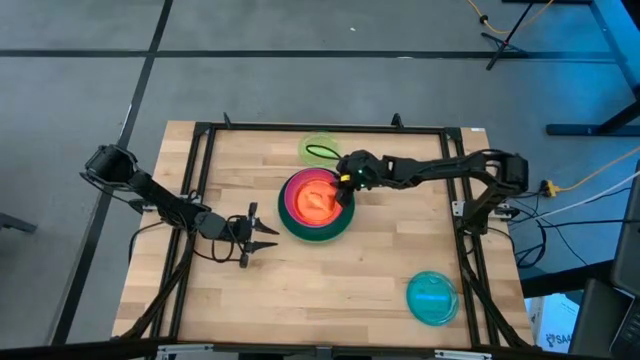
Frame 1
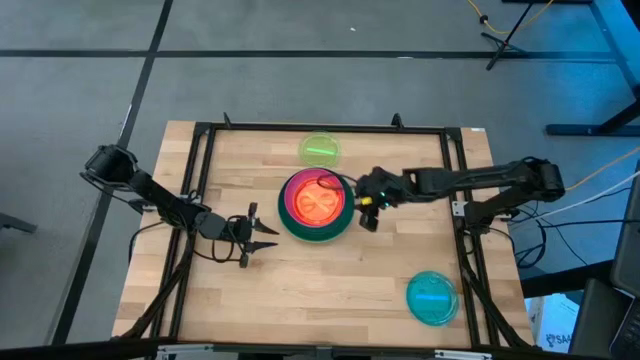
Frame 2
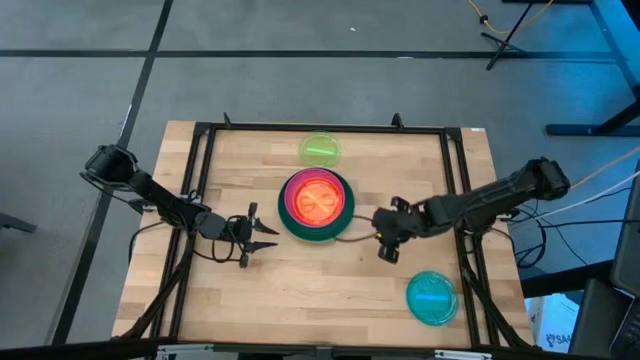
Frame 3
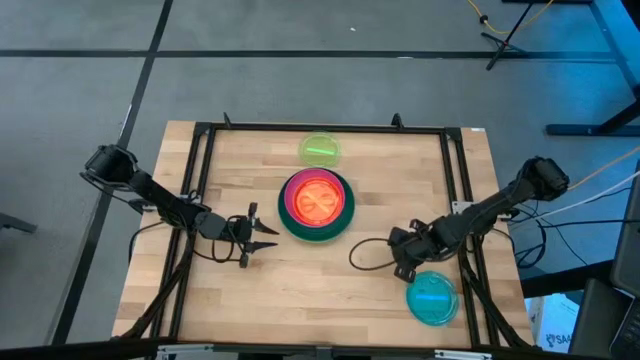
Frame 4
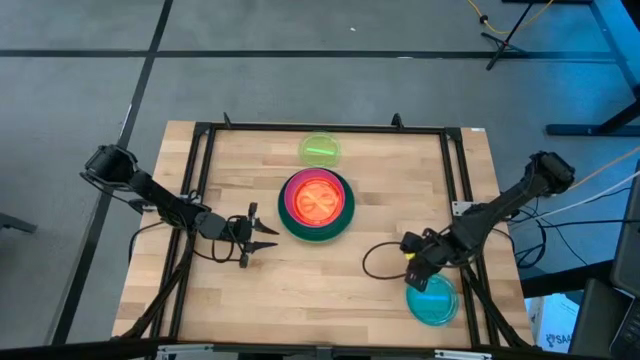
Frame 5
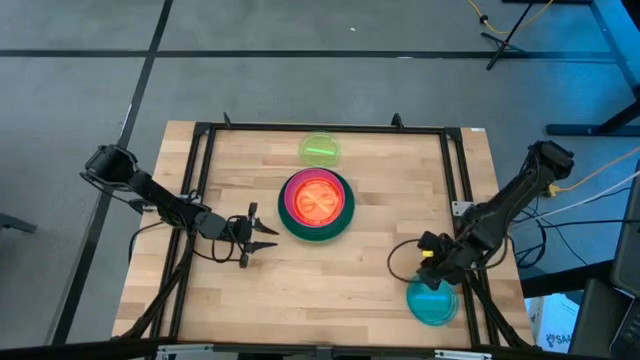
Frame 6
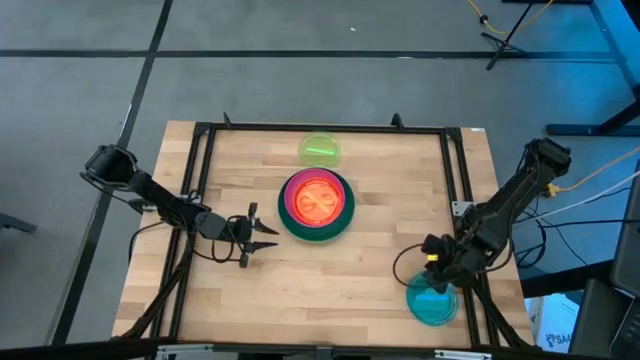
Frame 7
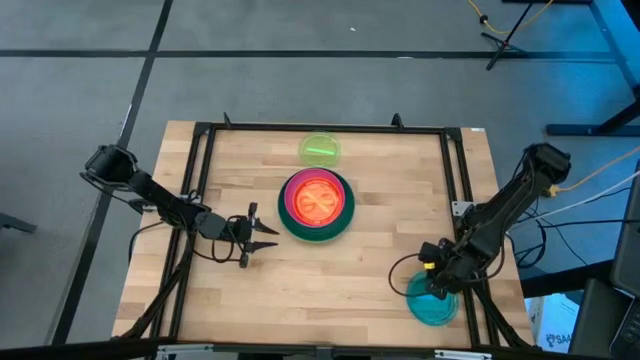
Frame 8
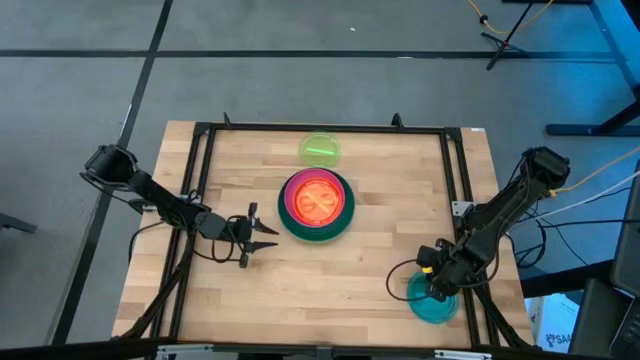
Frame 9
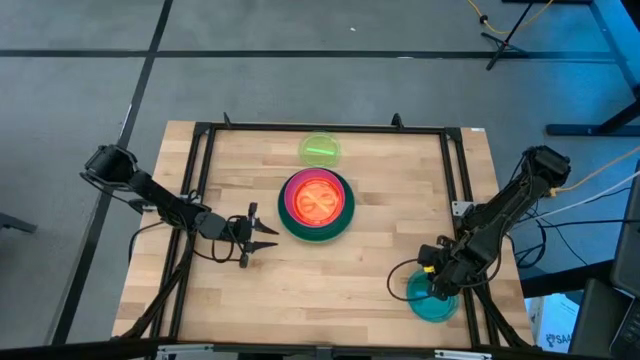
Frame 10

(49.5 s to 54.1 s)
Task: Stack plastic plates
Stack the light blue plate on the orange plate

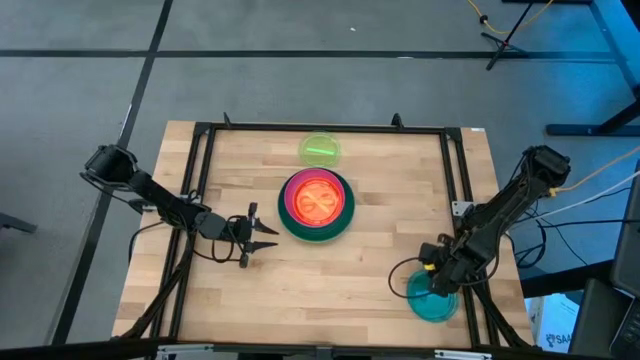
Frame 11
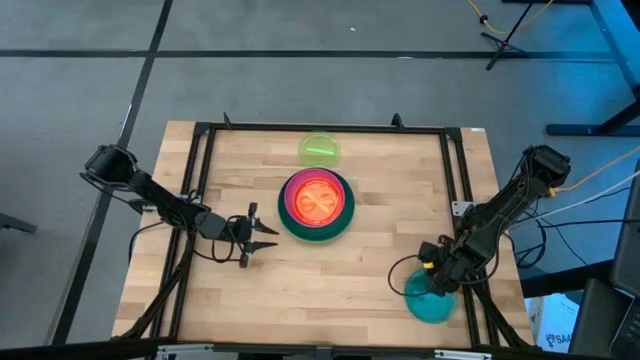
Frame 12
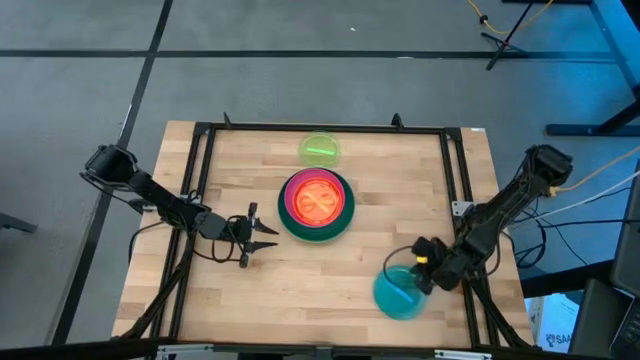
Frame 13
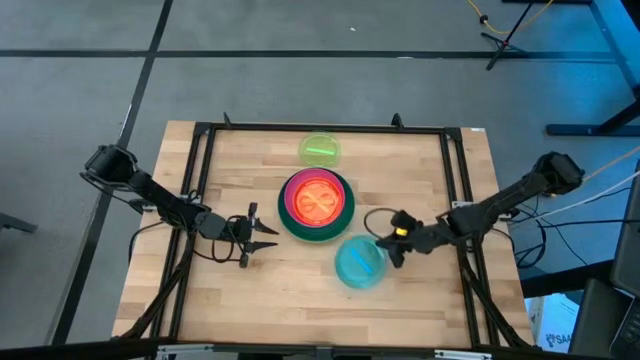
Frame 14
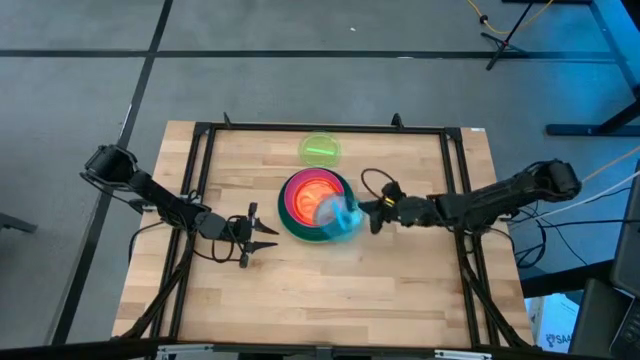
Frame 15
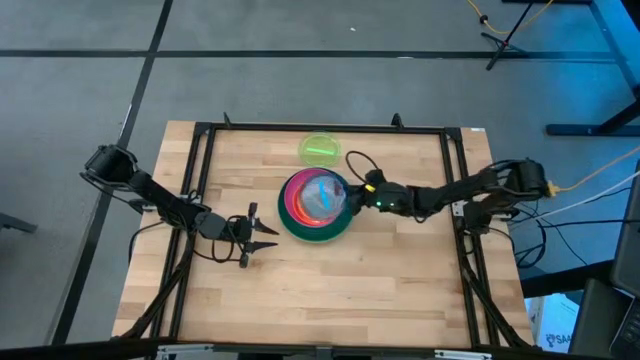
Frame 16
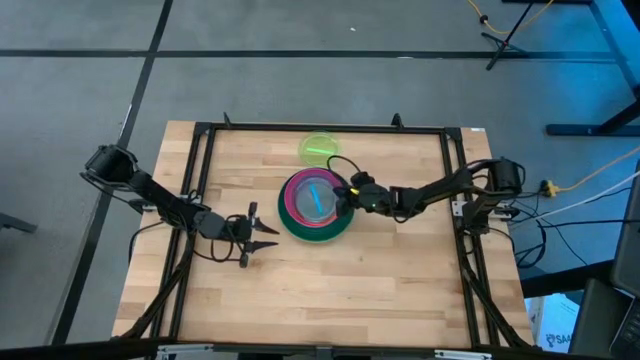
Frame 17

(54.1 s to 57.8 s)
Stack the light blue plate on the orange plate

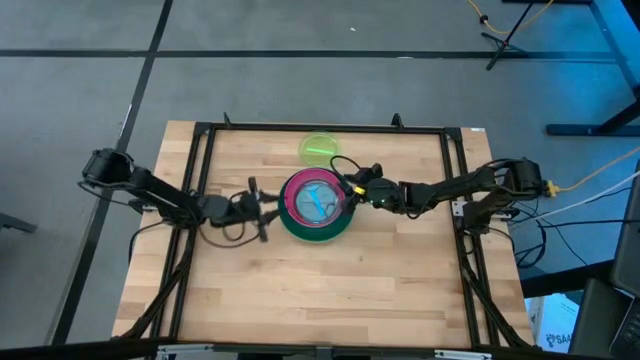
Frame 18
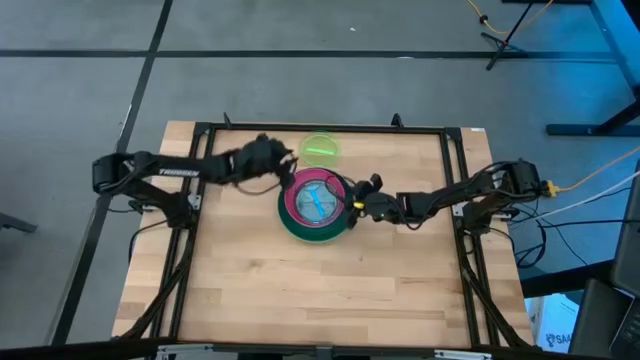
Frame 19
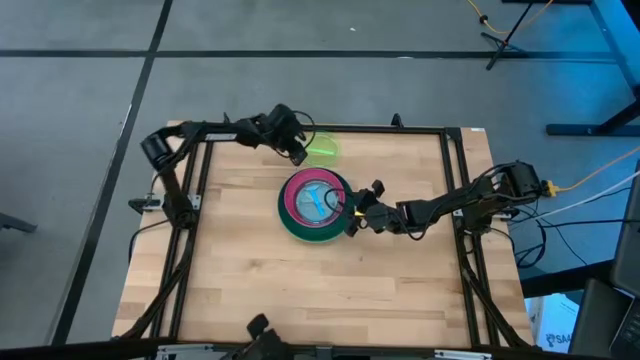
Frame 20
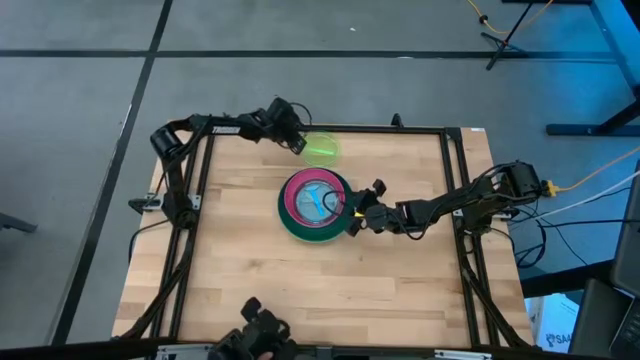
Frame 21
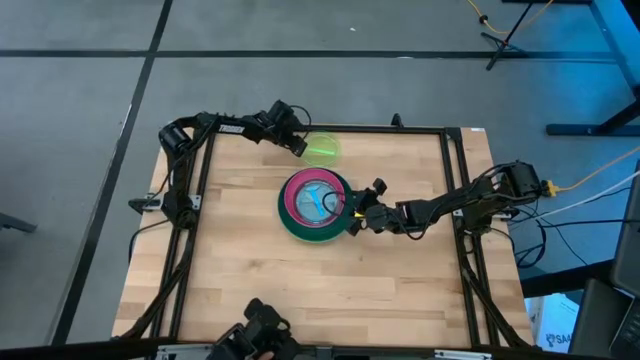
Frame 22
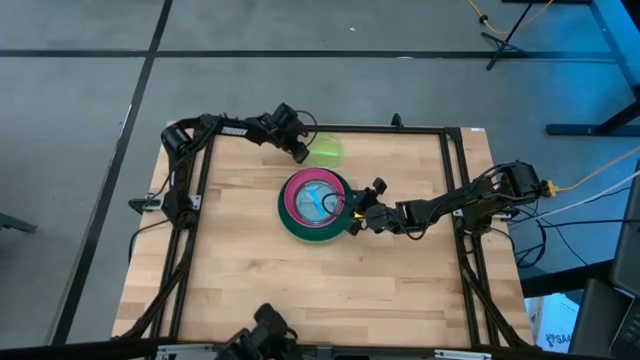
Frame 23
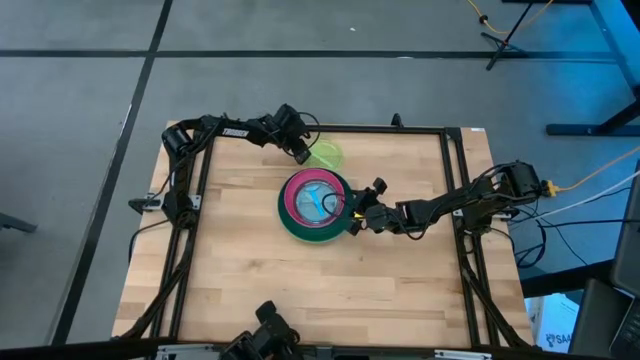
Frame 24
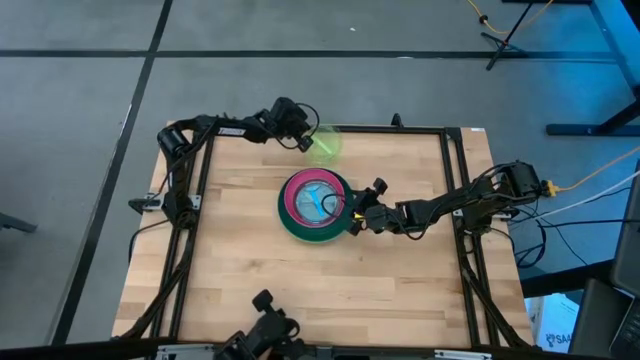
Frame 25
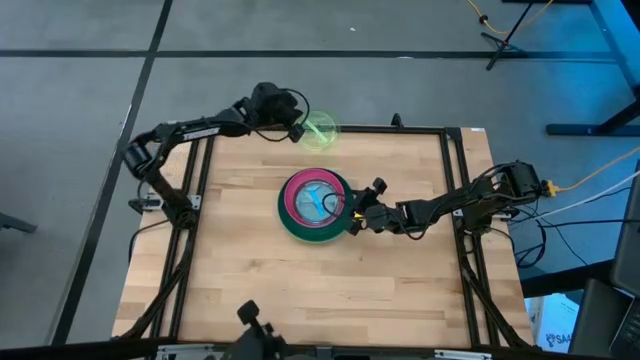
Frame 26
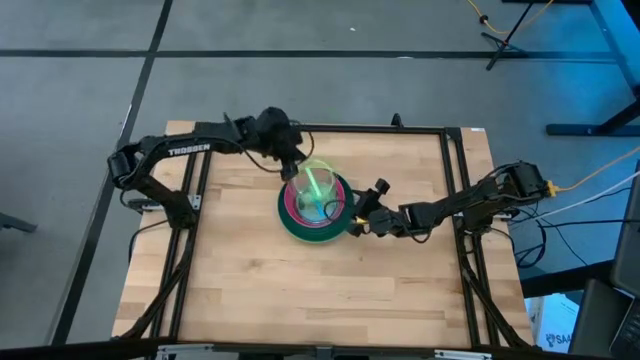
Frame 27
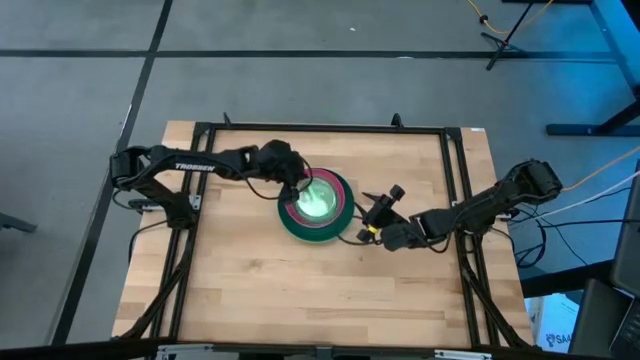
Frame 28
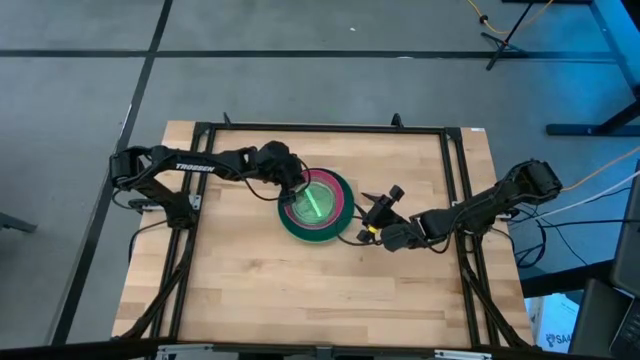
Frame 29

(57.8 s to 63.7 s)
Stack the light green plate on the light blue plate

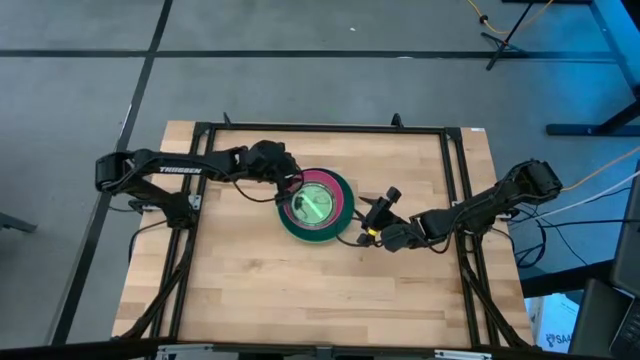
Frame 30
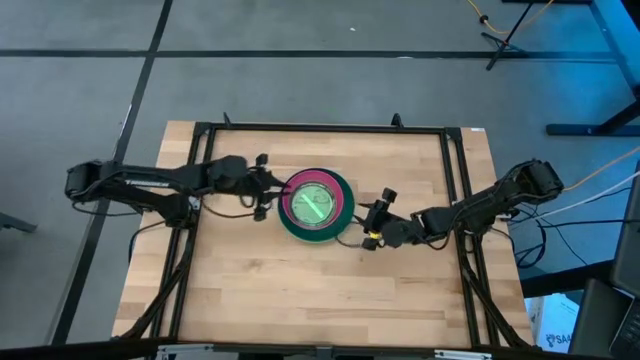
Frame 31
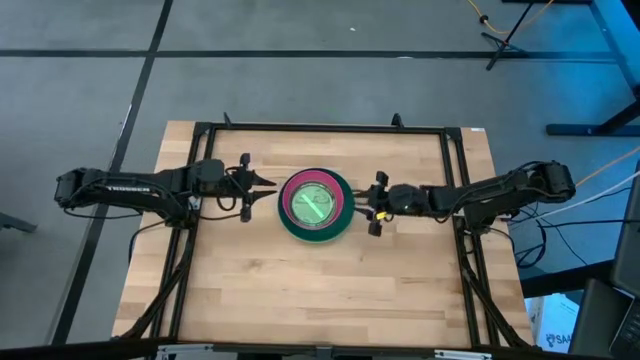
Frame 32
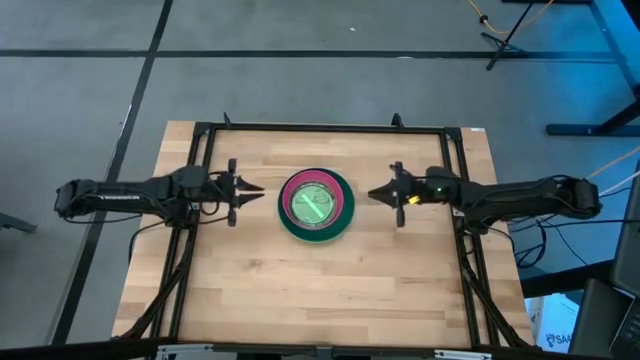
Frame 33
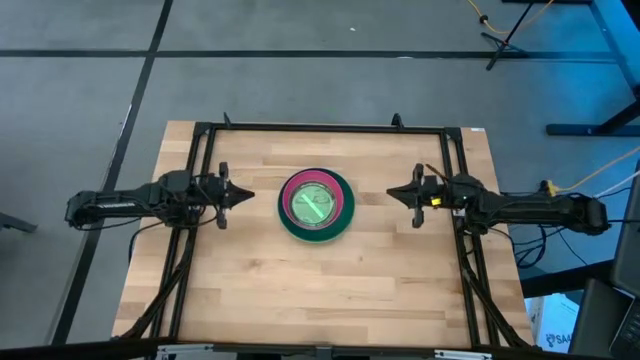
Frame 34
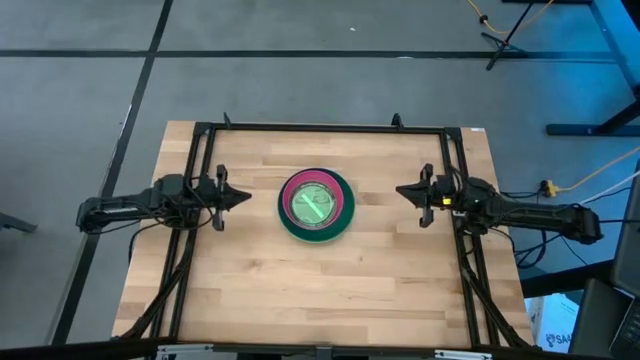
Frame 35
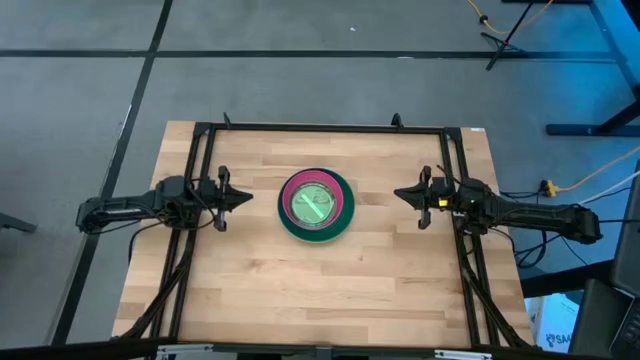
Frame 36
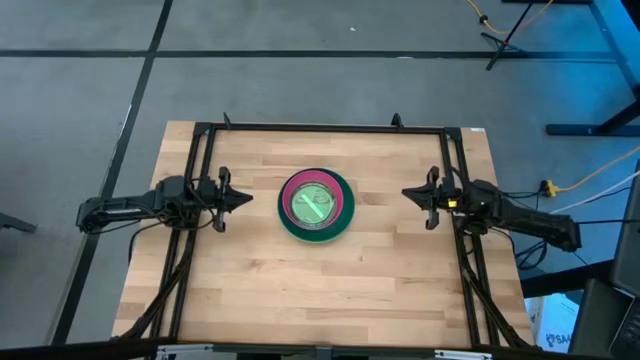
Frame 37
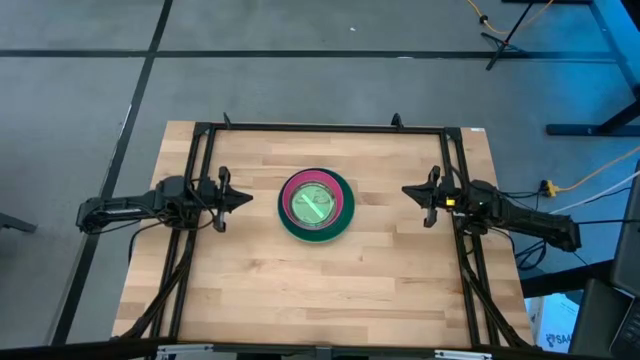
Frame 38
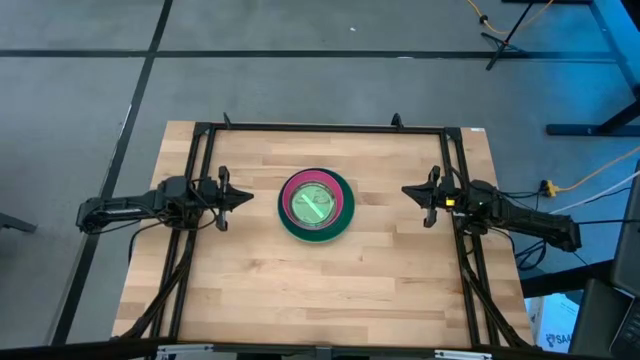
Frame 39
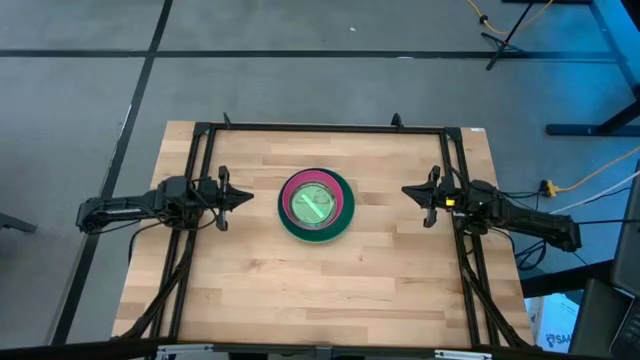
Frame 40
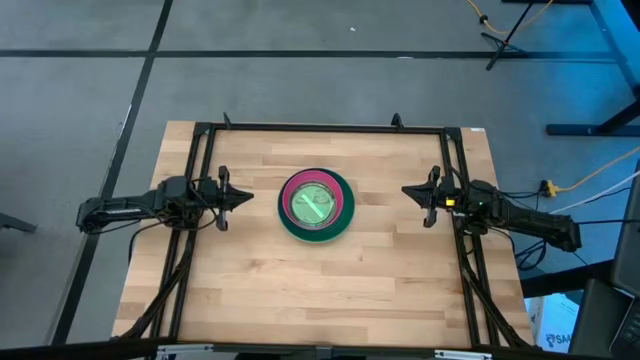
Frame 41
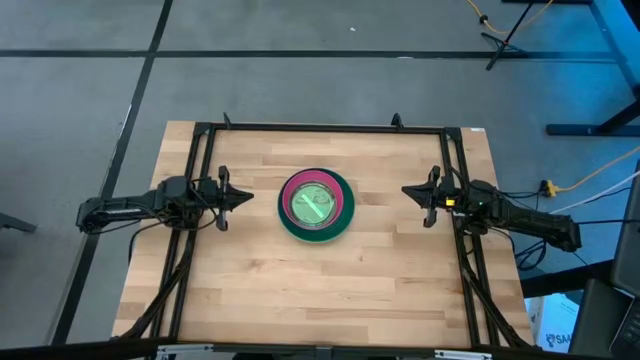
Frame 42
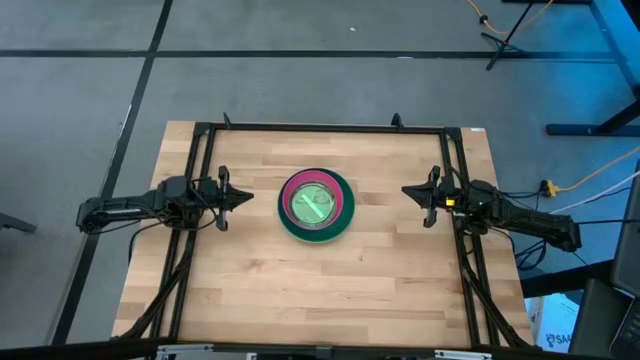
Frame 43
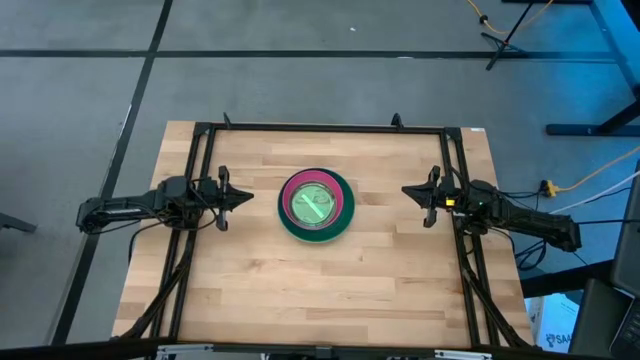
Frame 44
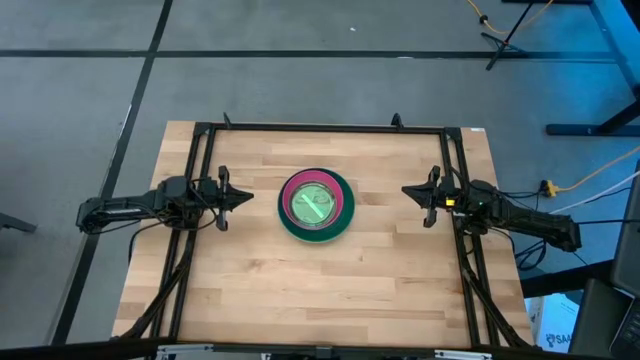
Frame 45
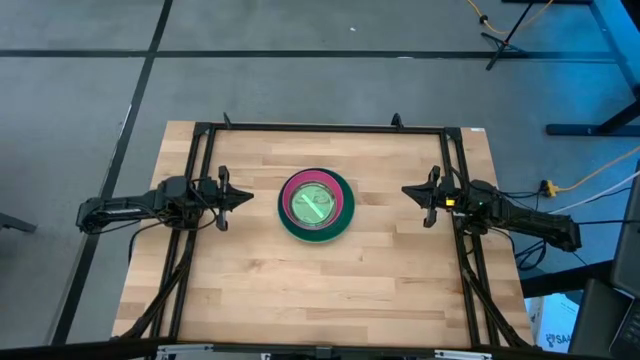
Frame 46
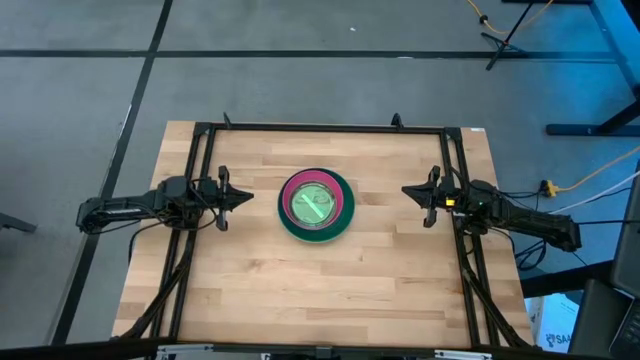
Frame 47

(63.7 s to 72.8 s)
Return to Home Position
